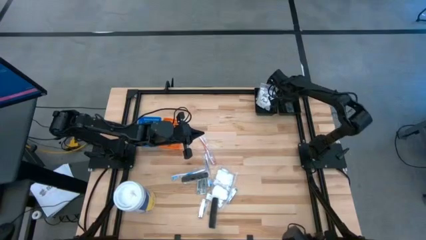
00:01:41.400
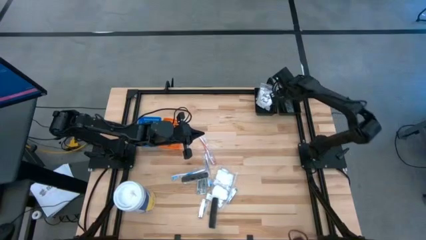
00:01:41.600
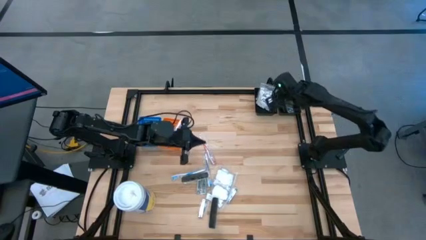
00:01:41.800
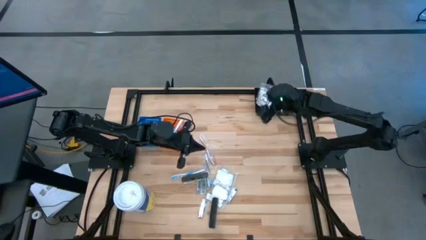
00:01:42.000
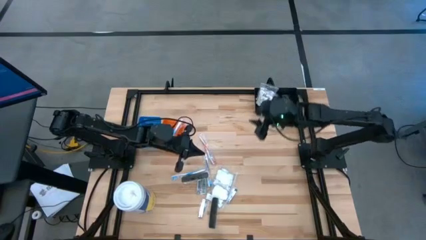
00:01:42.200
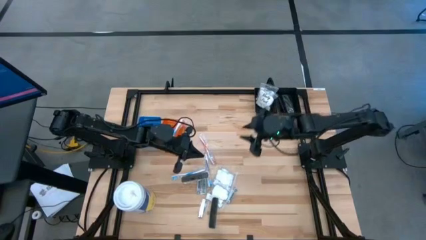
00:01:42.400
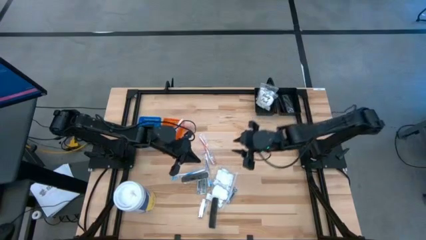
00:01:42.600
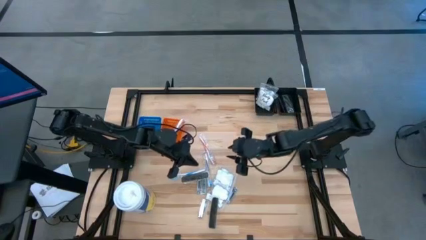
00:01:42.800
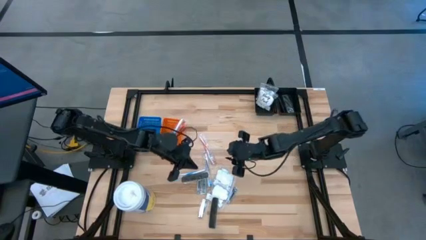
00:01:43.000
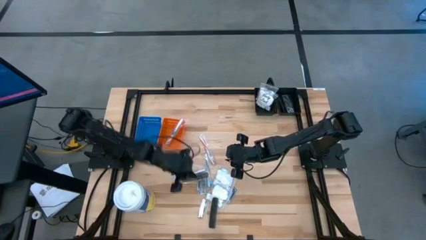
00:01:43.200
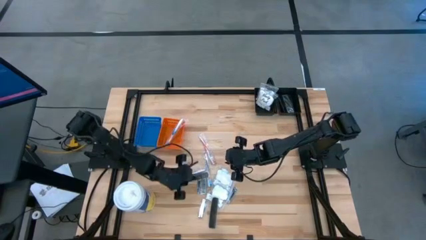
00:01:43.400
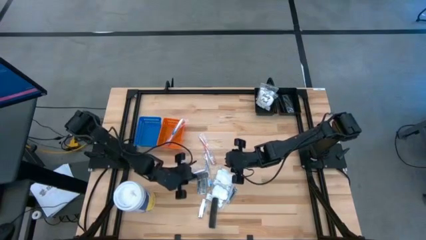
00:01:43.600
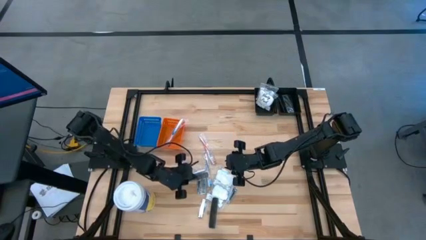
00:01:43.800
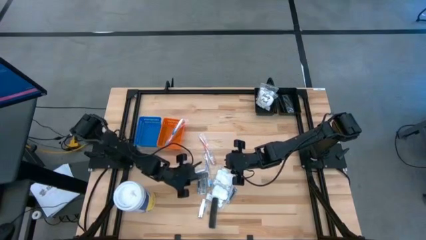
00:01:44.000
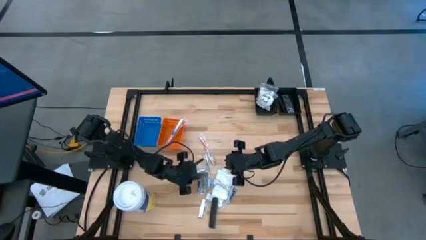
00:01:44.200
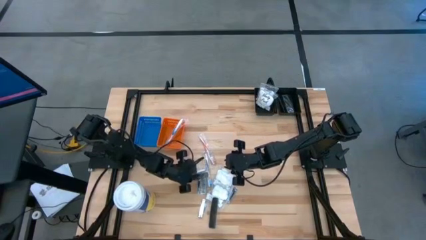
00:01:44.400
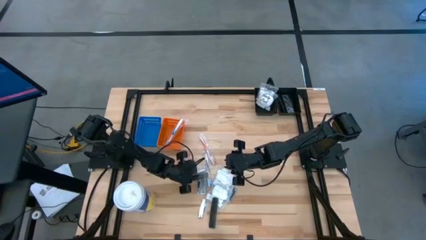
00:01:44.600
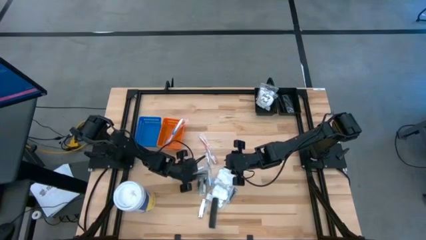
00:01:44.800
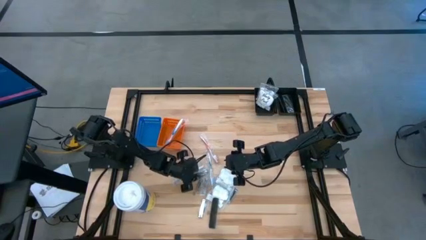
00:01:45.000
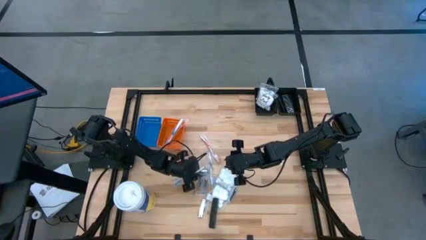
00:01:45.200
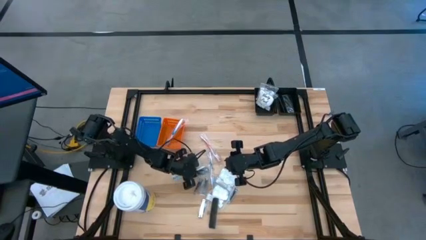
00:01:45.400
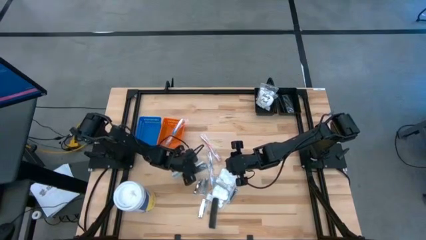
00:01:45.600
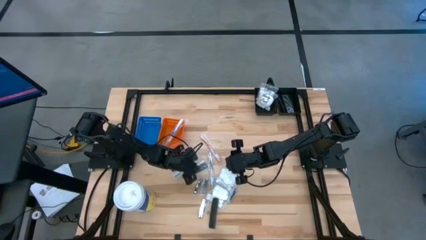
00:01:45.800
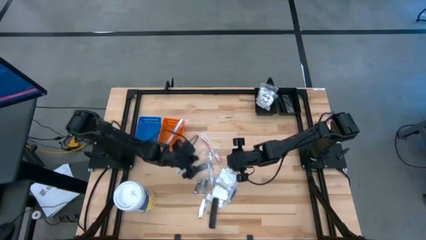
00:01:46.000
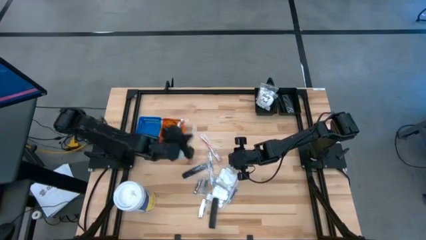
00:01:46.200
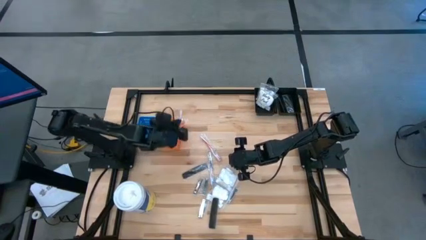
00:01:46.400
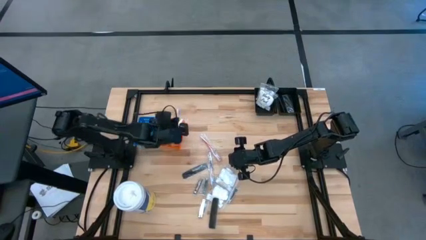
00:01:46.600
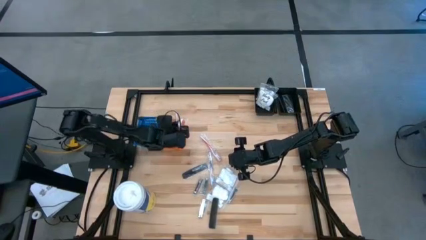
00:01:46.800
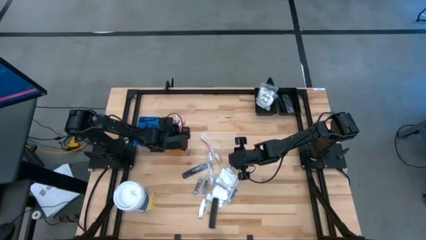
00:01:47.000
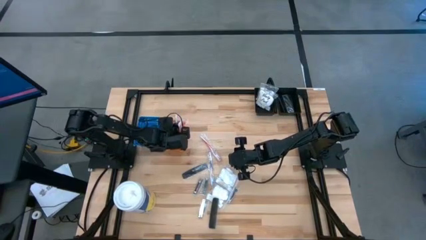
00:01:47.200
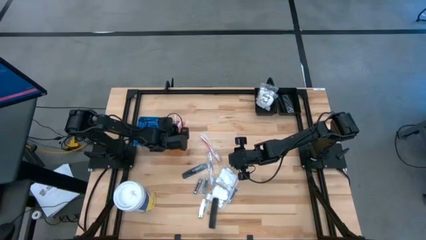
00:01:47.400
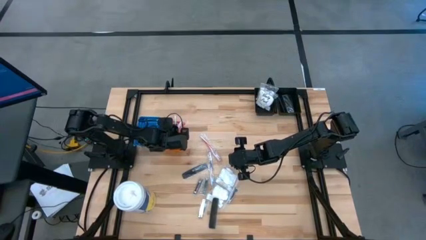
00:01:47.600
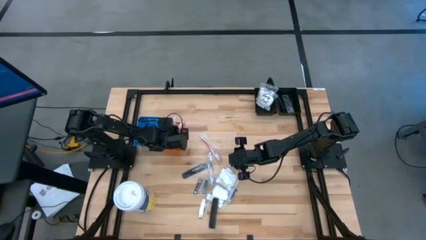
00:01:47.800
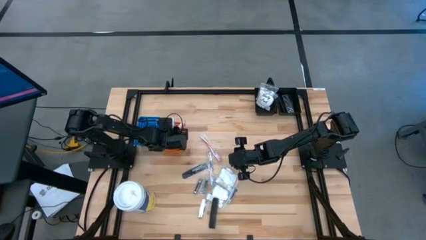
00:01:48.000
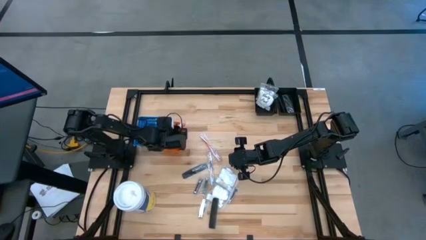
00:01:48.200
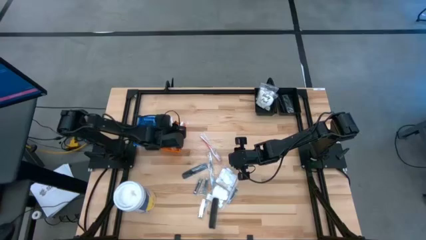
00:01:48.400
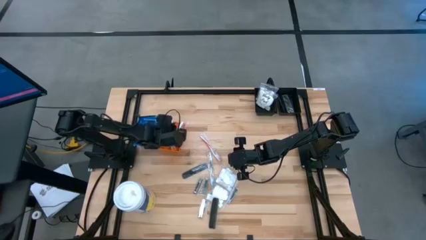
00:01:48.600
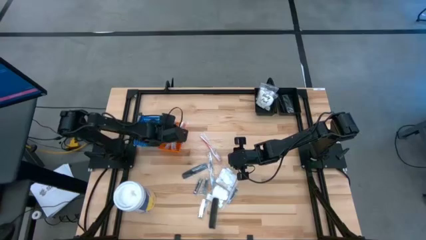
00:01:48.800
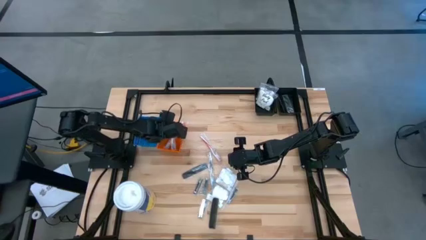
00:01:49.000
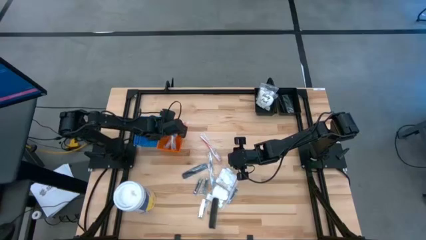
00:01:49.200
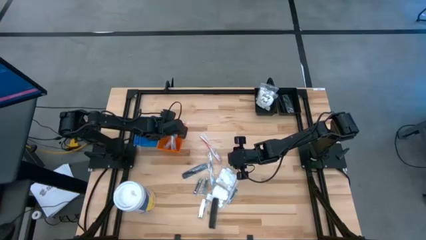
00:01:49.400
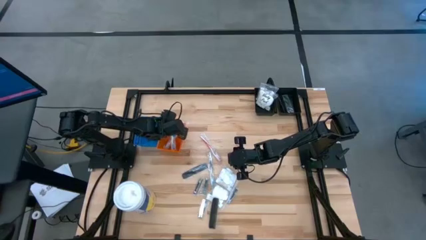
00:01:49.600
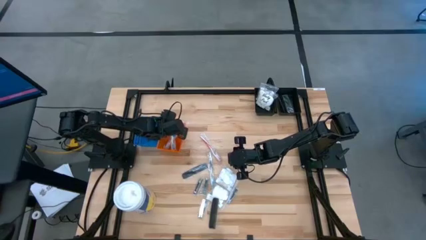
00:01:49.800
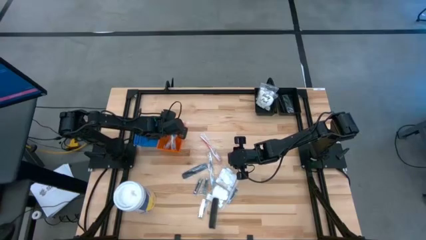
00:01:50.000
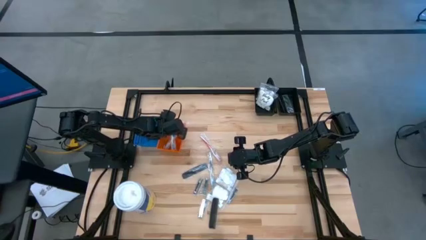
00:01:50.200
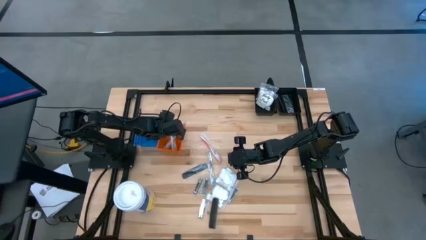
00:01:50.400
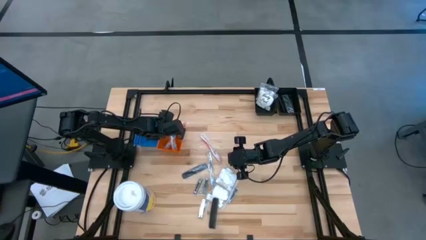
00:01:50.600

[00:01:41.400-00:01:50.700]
Task: Pick & Place Travel size toiletries
Put the blue toothbrush into the orange bin

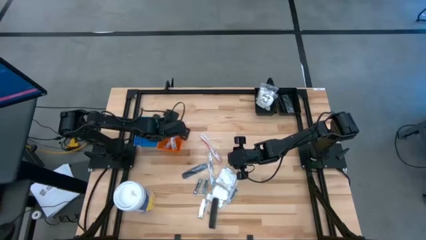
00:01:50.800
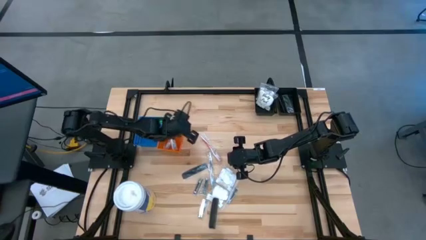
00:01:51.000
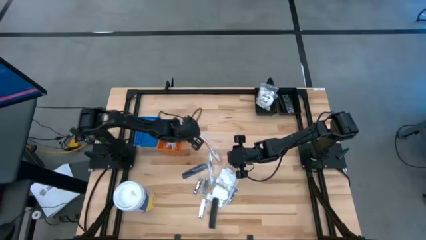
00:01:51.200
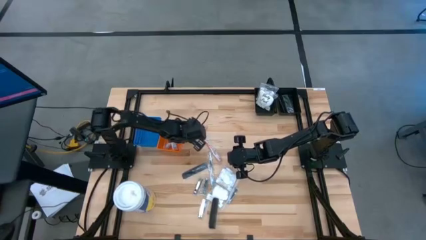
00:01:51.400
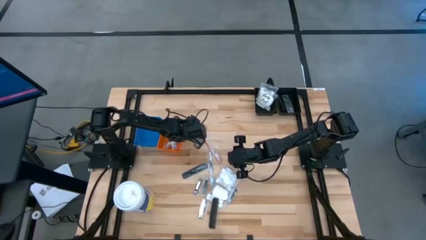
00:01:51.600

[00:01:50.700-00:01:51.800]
Adjust the orange bin

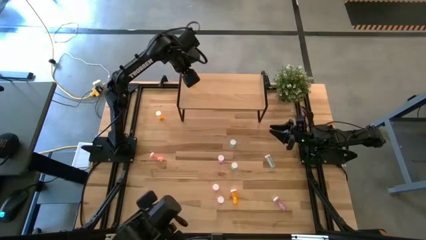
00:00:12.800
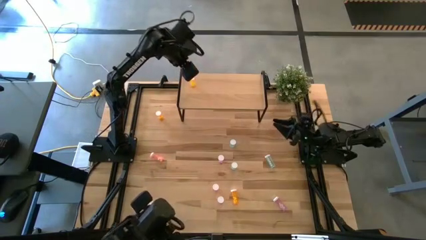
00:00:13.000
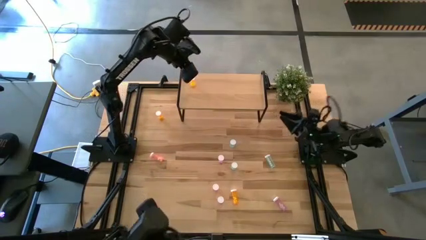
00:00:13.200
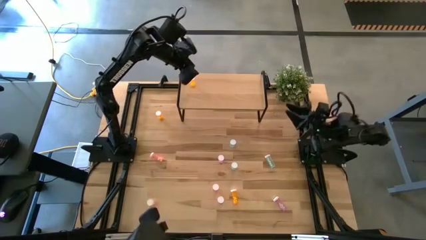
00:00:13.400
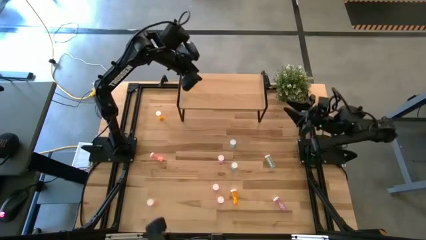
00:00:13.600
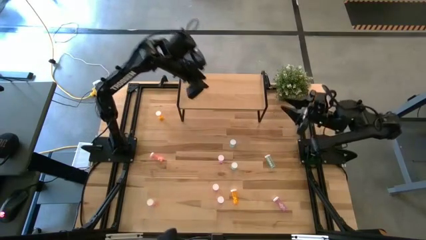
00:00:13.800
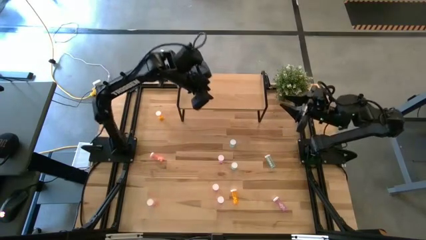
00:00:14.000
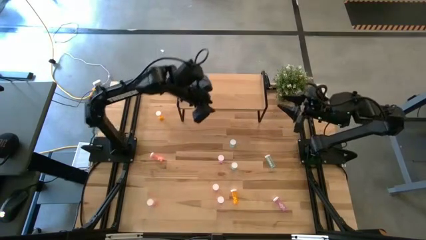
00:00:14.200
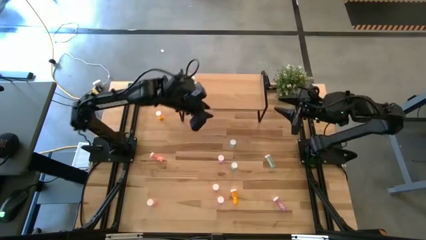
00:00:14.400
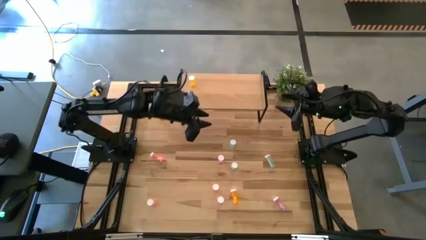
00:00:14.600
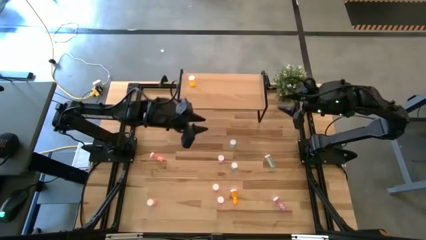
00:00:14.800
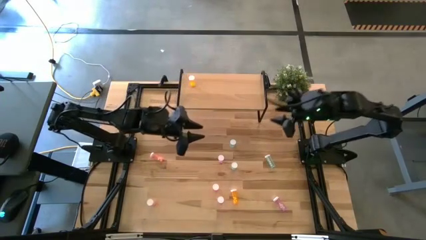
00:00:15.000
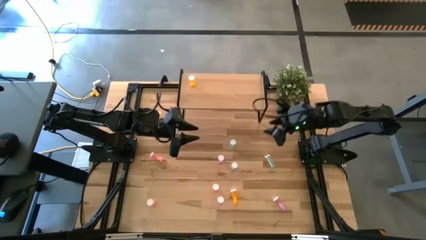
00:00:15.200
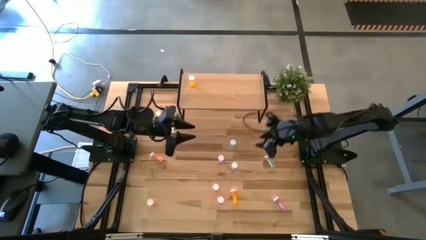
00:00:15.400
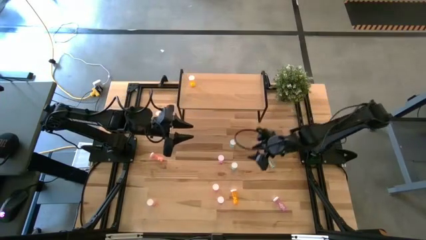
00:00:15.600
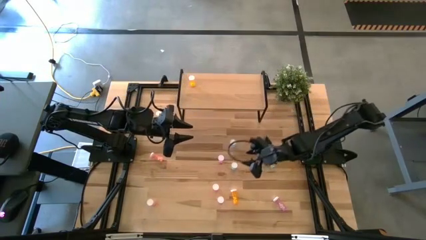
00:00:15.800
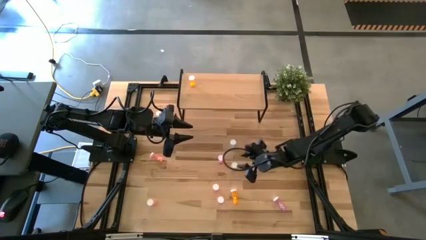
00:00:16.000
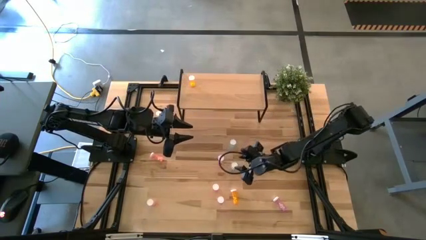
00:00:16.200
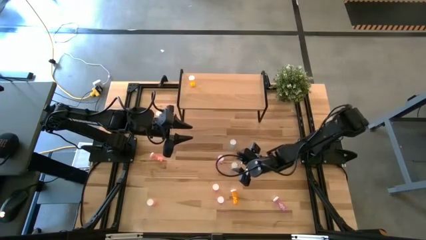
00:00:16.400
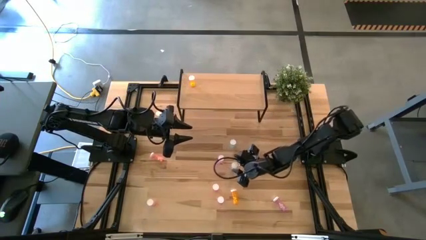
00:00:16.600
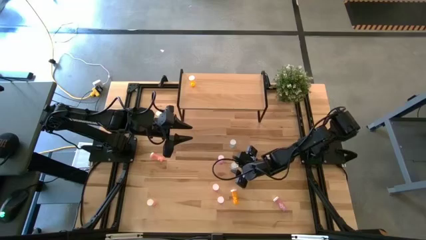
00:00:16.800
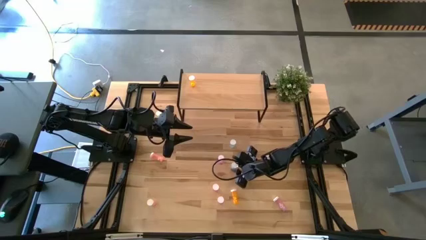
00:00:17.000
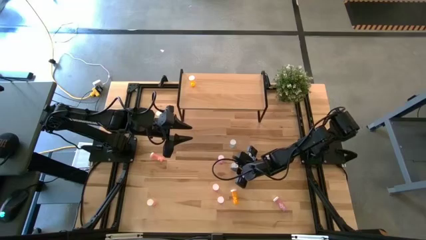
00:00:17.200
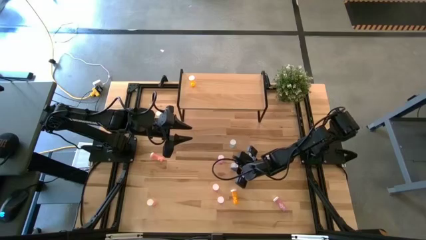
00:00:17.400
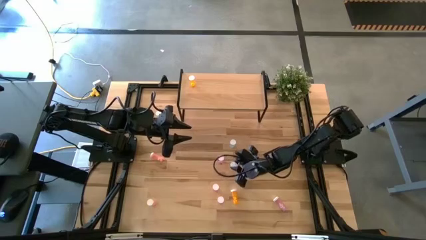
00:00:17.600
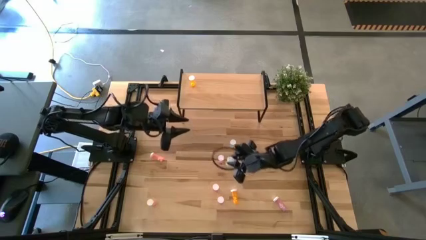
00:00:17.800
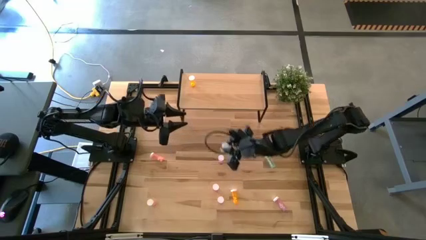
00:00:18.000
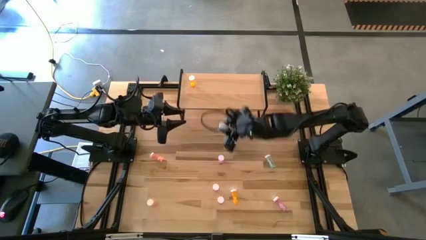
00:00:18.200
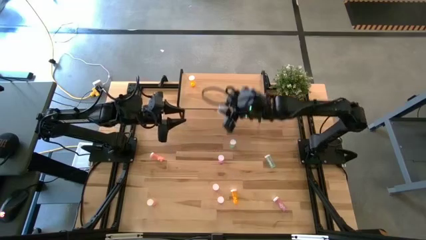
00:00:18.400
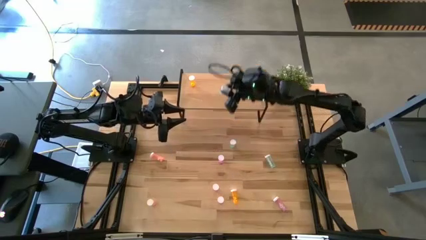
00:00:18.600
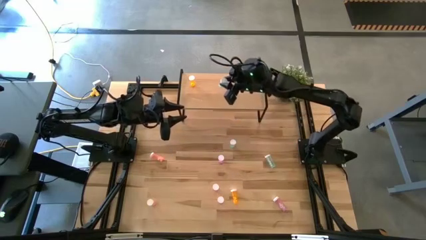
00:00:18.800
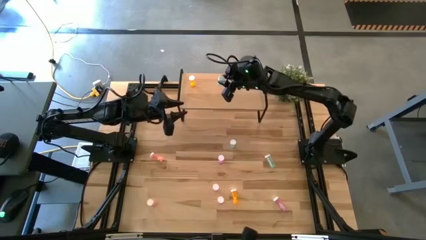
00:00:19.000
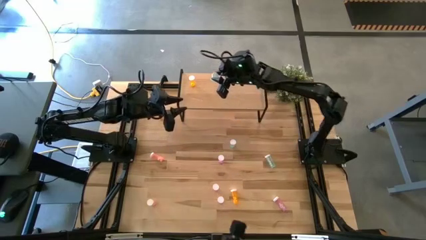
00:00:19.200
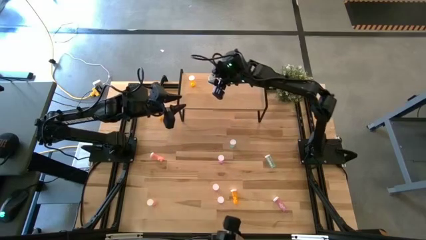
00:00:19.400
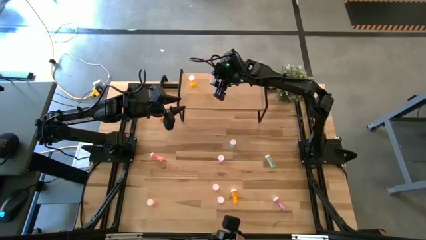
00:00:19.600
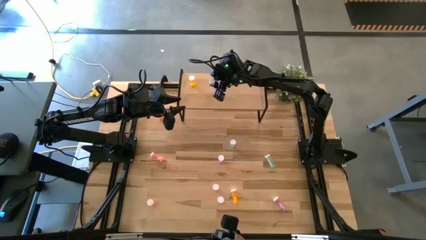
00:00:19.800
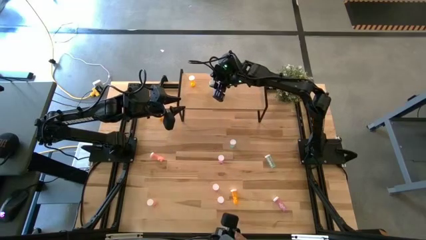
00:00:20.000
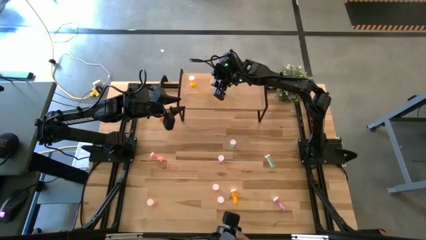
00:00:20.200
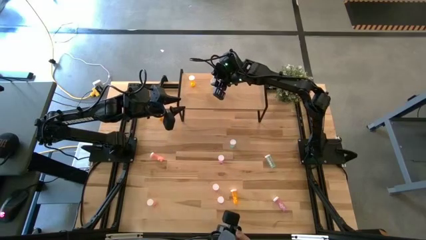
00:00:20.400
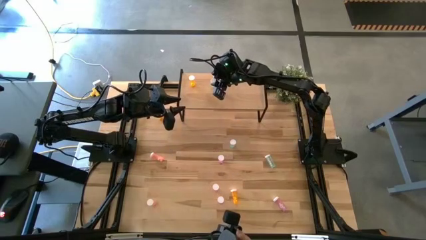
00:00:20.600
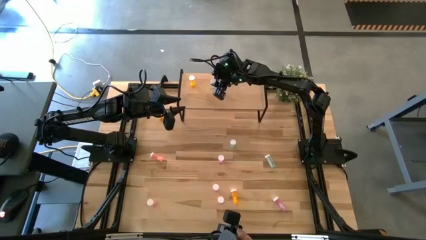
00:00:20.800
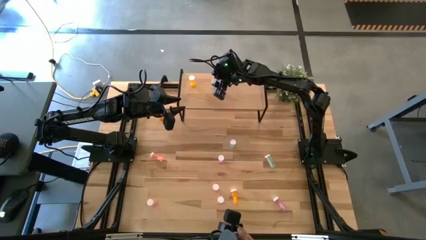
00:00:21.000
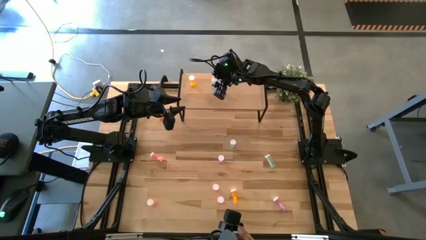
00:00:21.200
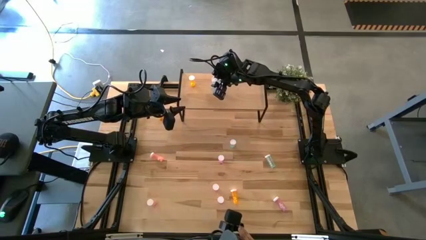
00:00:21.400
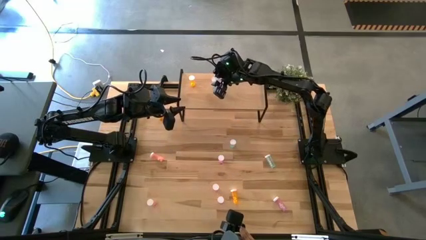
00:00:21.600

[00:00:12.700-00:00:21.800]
Task: Pick and place medicine bottles onto shelf by color
Put the bottom left green pill bottle on the shelf
